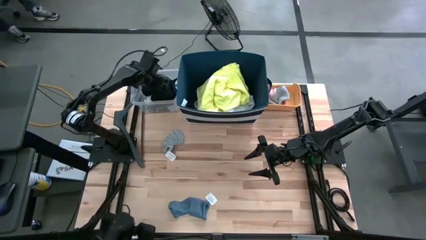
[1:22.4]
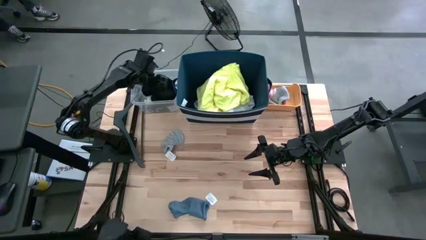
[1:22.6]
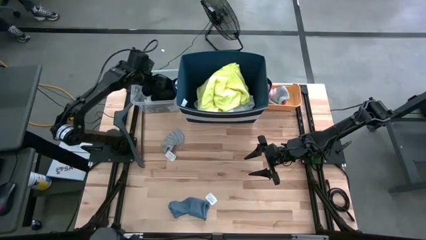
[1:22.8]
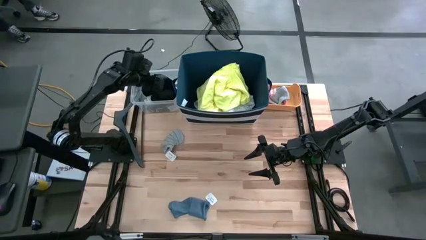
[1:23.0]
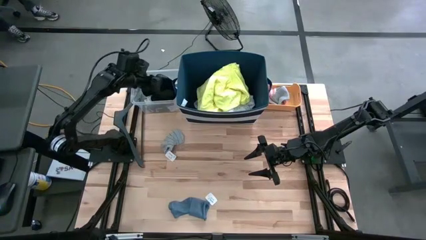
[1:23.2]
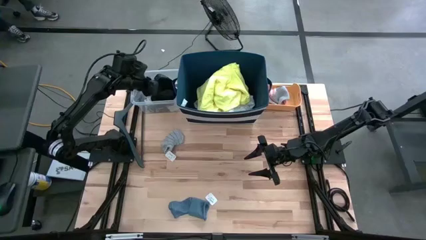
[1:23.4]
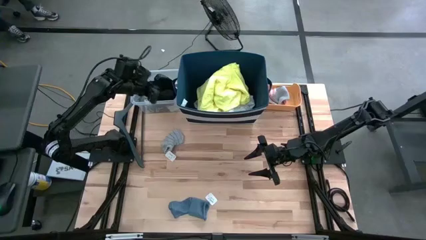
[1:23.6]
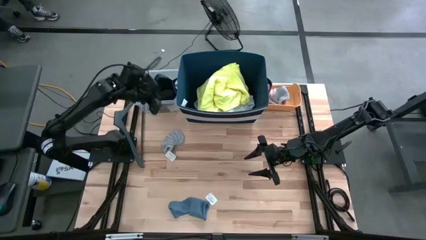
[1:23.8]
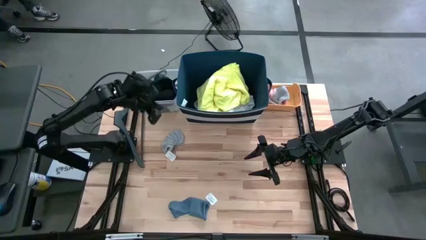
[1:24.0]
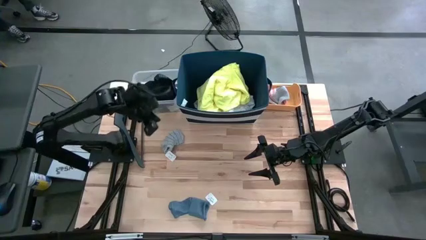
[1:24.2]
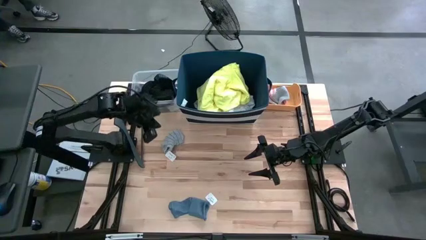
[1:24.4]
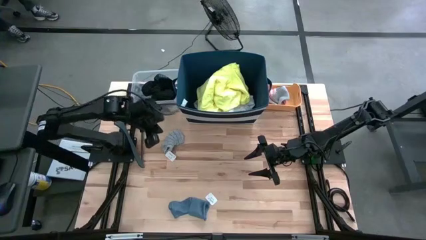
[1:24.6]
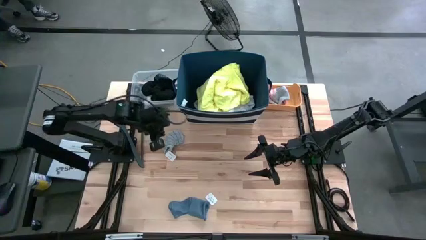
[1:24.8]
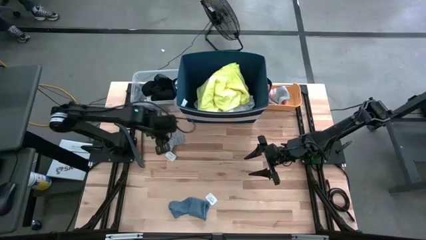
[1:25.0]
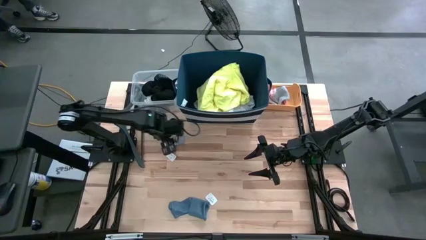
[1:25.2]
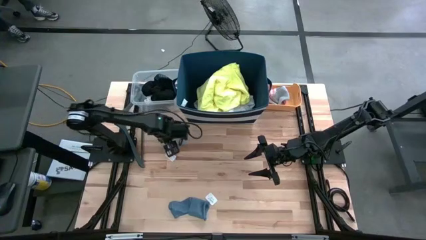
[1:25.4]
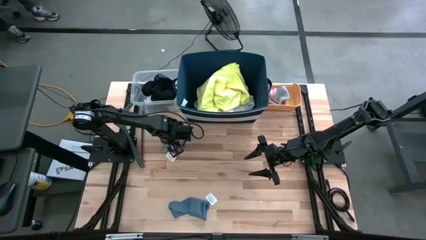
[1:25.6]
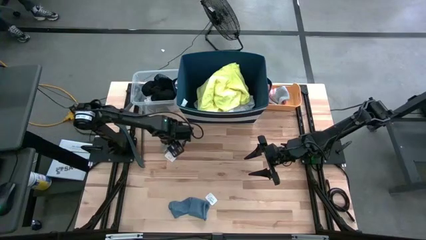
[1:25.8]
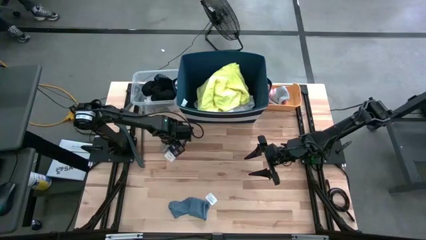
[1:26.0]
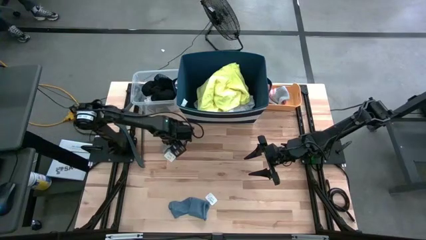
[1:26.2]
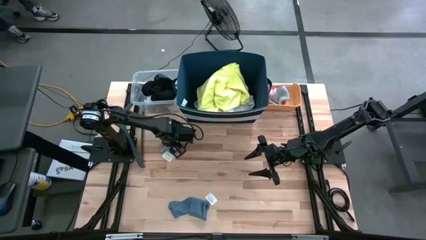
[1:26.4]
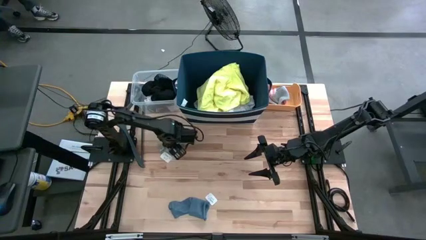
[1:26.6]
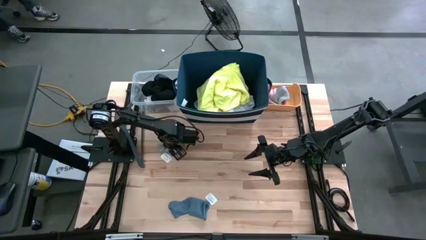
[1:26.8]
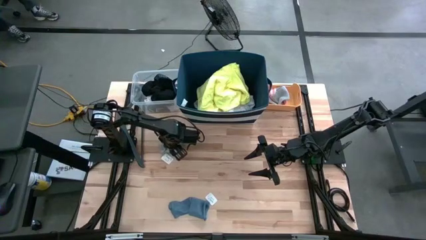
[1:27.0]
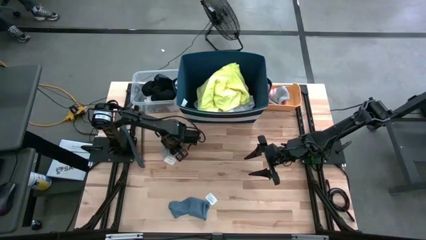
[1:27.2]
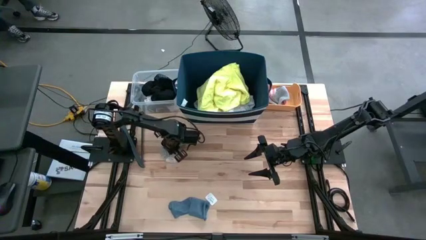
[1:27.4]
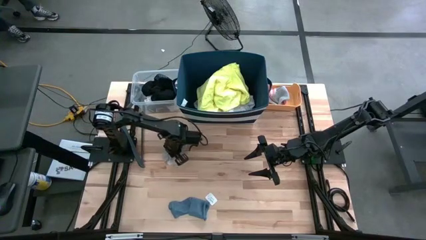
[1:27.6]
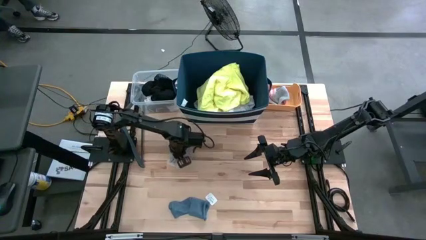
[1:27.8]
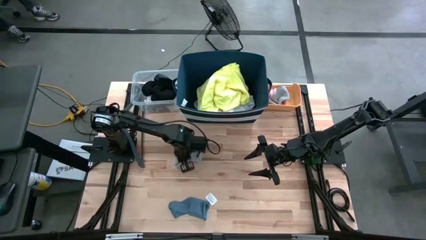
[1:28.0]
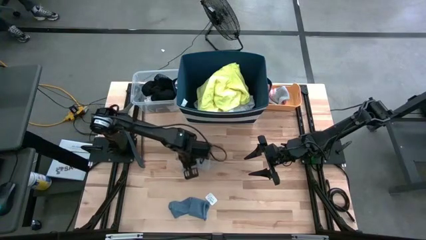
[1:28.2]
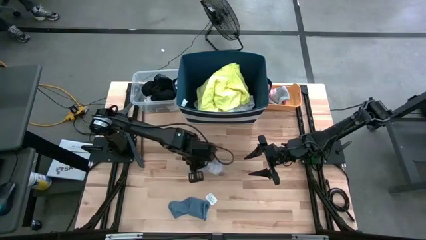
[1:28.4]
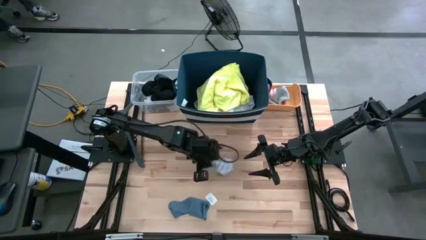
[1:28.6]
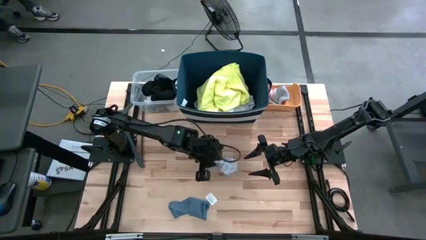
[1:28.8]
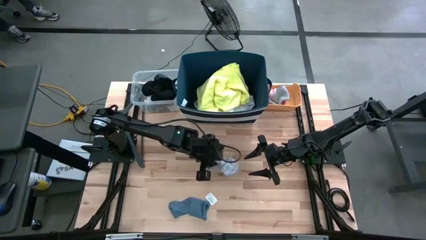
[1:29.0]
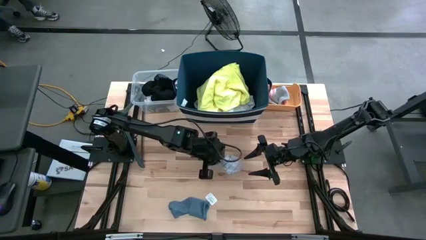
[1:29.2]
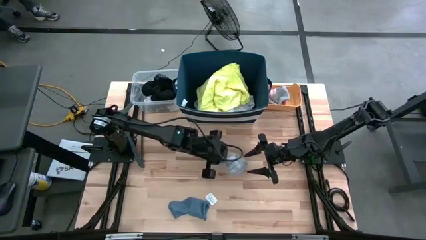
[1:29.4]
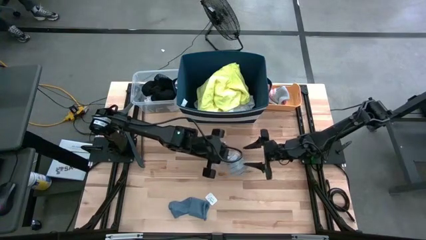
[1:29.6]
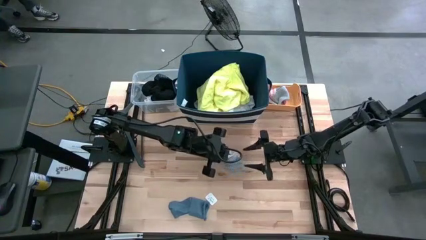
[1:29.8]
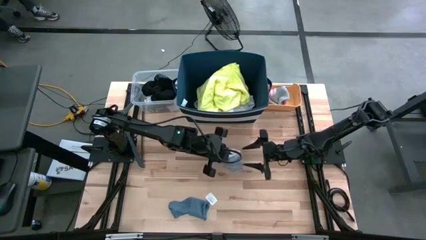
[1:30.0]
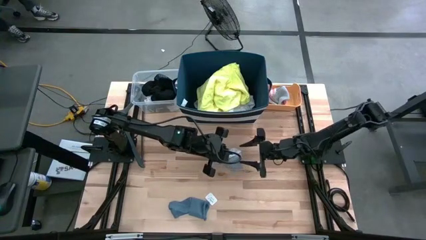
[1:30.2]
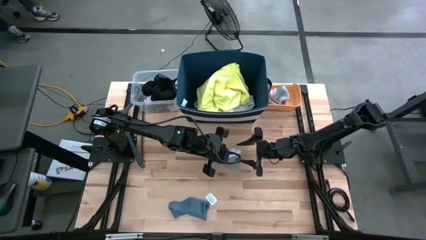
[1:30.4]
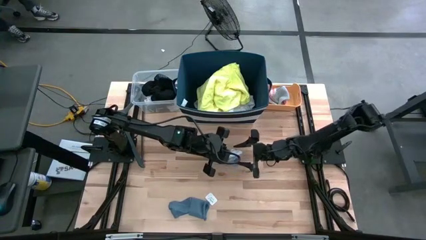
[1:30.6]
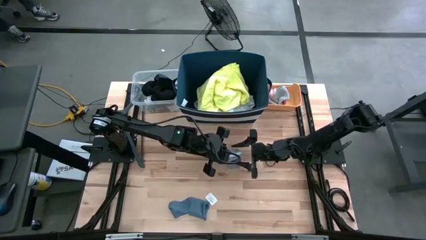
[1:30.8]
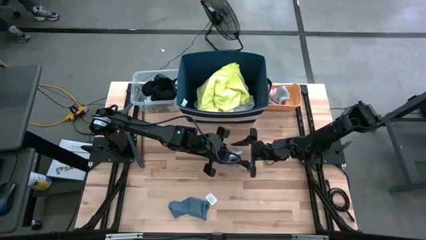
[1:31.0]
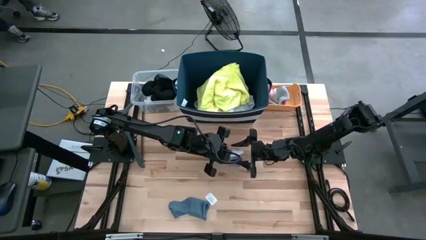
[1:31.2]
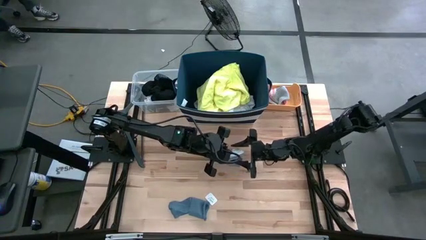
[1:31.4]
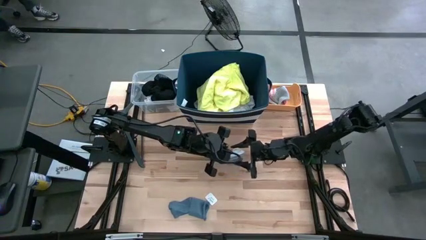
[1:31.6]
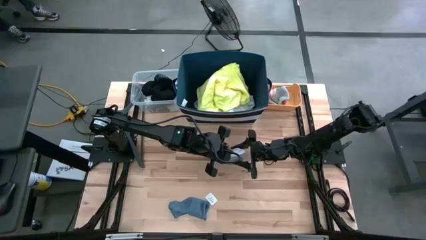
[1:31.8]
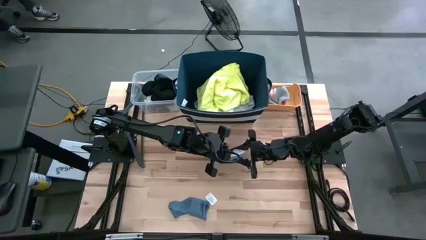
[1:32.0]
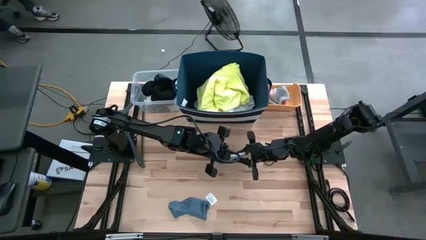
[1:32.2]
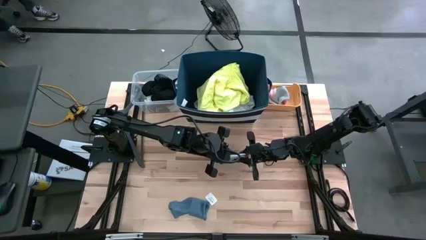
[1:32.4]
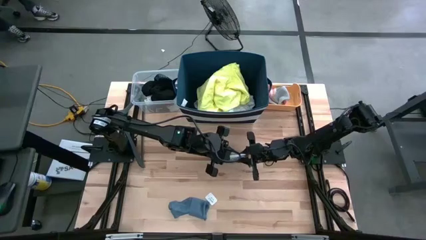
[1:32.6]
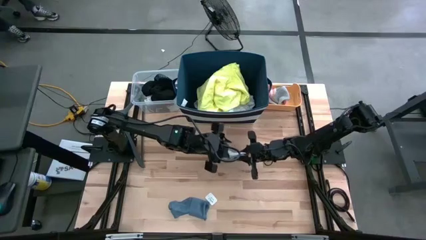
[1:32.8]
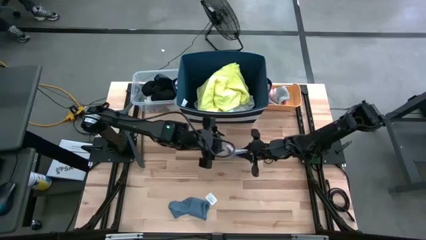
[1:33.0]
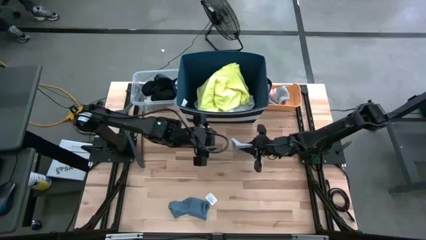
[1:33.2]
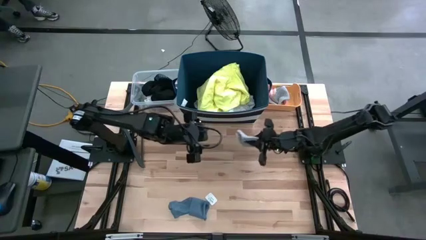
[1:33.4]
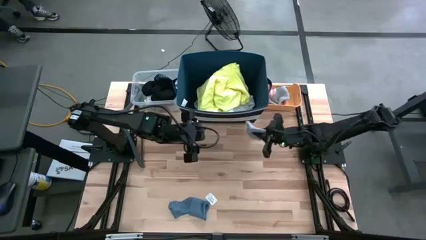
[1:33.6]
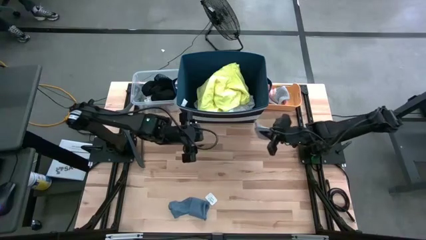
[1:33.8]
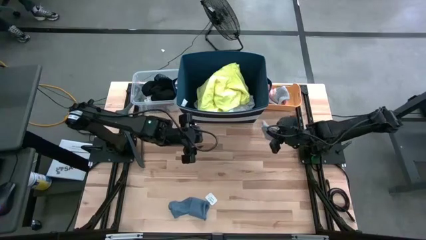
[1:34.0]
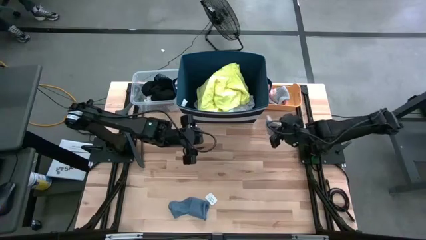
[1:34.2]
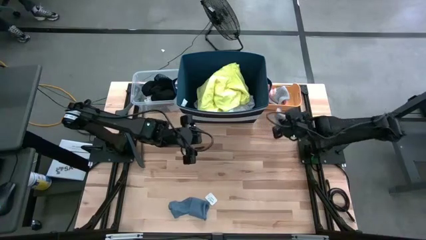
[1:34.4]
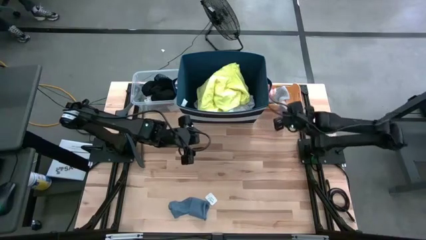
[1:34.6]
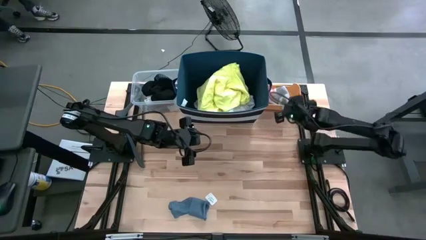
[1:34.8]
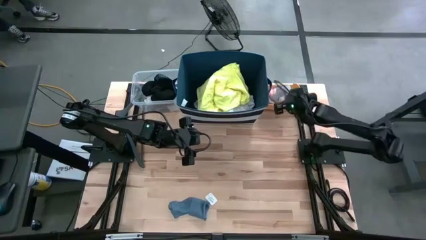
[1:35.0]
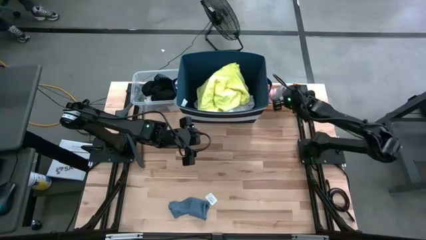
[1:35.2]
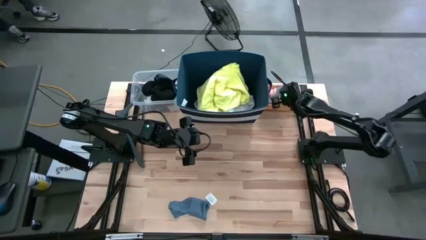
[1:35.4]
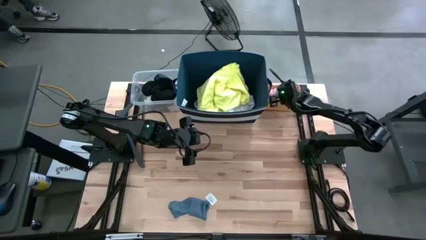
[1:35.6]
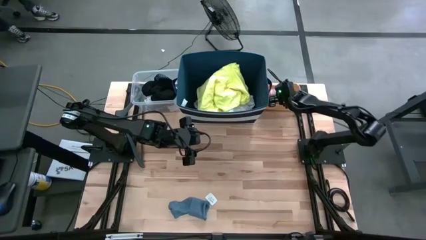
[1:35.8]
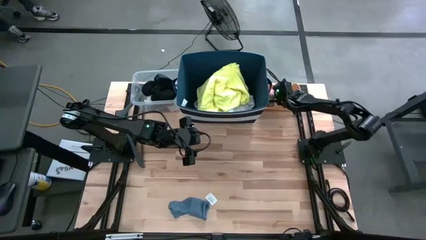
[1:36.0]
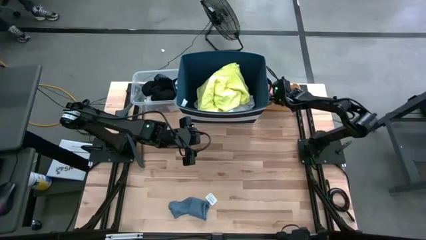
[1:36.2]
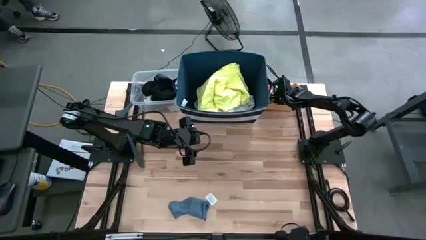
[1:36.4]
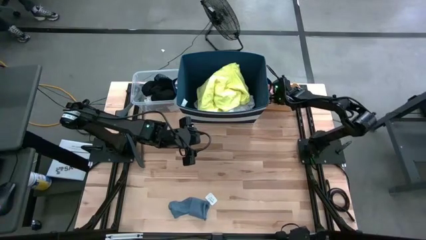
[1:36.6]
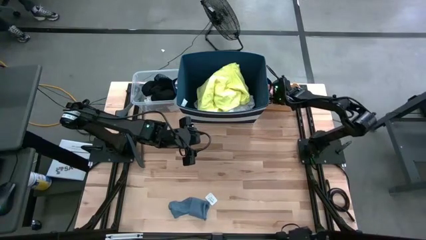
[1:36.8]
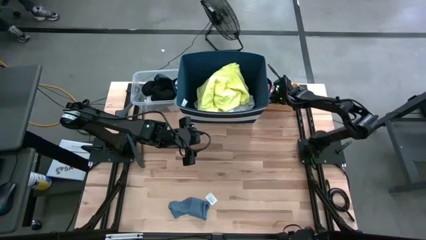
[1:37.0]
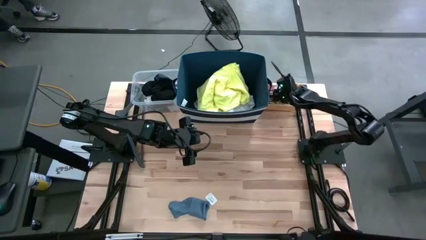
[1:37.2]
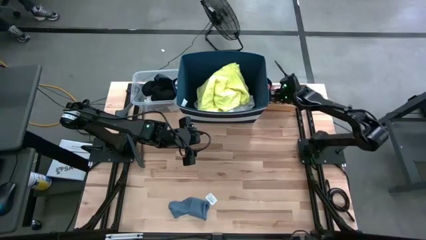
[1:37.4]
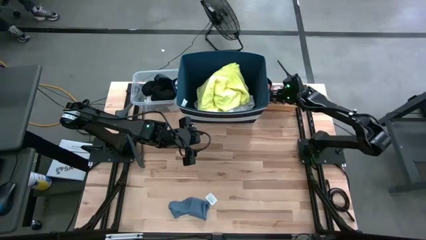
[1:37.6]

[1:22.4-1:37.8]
Task: Pick & Place Cloths
Put the gray sock into the yellow bin

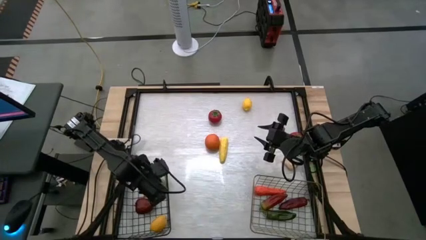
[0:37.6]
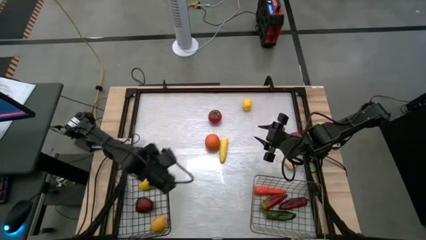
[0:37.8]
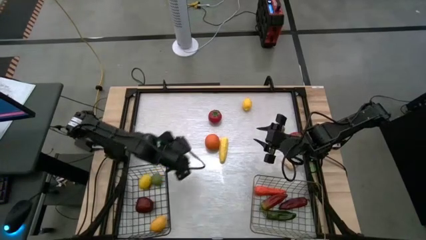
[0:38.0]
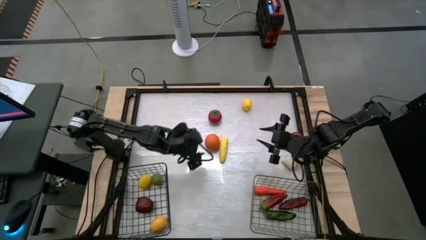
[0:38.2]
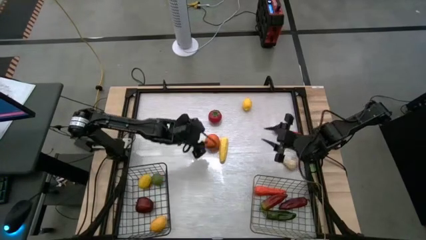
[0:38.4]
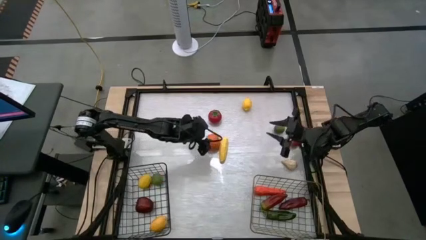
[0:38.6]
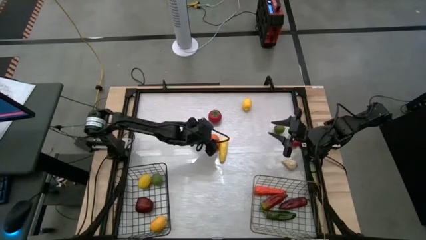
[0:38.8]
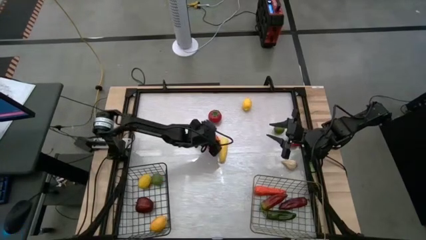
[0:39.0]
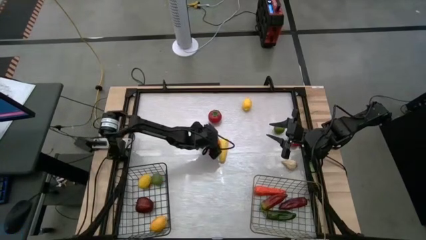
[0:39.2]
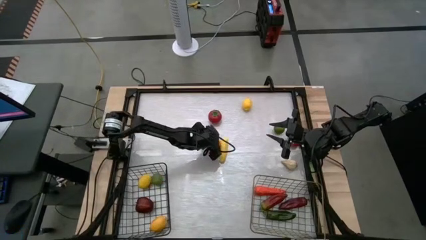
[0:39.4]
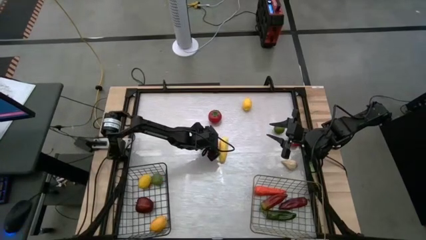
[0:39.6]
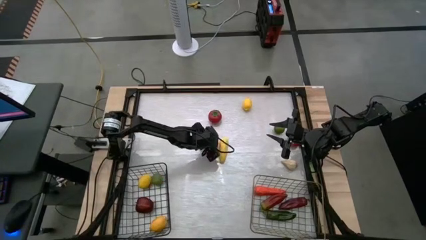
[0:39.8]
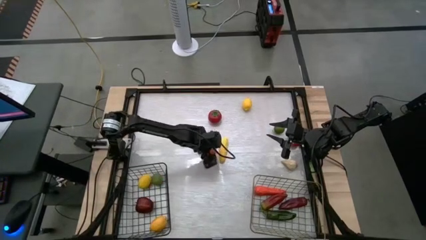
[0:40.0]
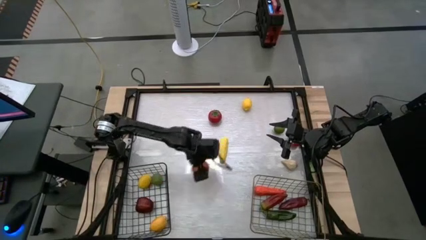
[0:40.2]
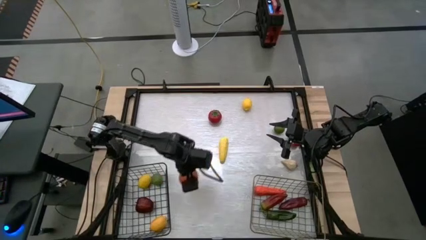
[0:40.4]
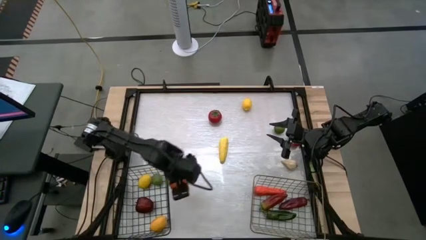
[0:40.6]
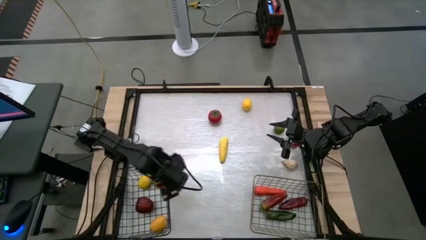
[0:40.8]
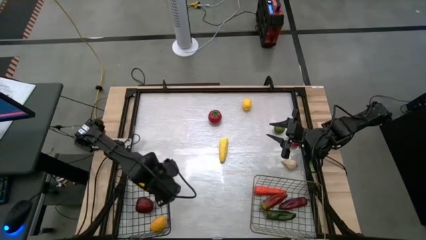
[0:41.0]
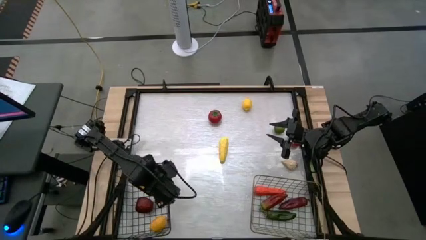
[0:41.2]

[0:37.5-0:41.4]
Task: Sort produce into baskets
Put the orange into the black wire basket
